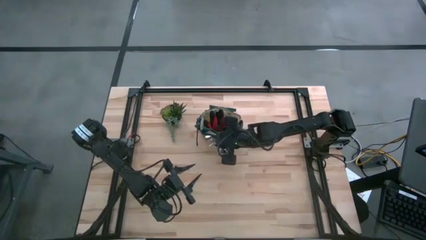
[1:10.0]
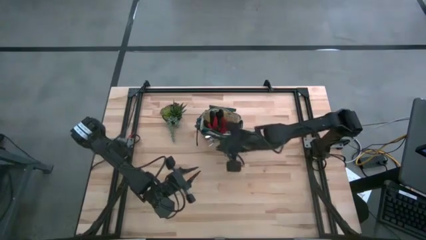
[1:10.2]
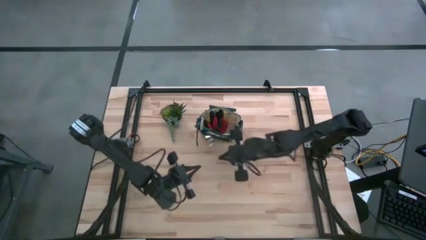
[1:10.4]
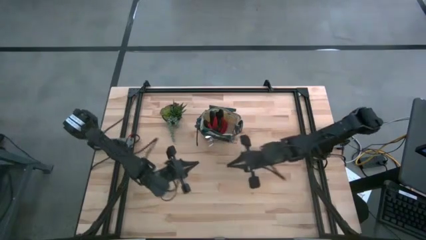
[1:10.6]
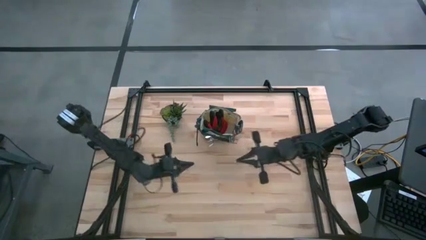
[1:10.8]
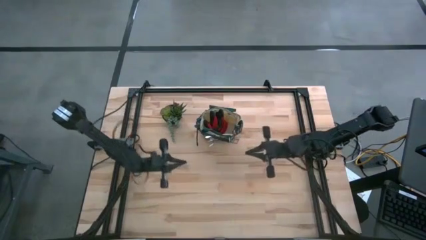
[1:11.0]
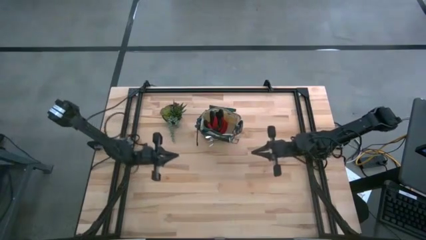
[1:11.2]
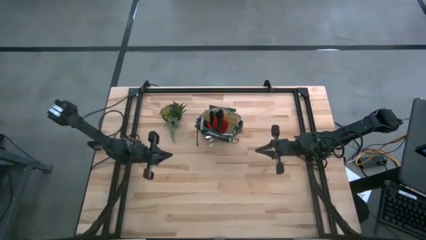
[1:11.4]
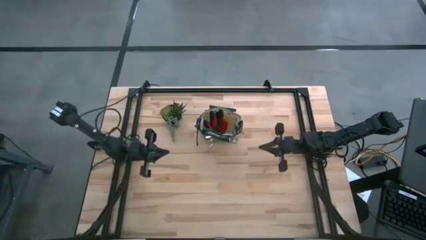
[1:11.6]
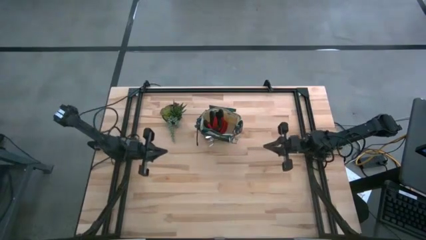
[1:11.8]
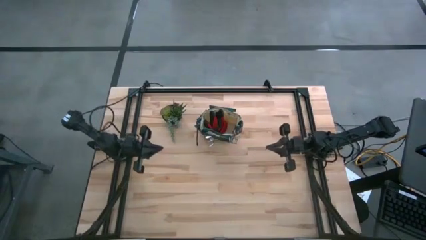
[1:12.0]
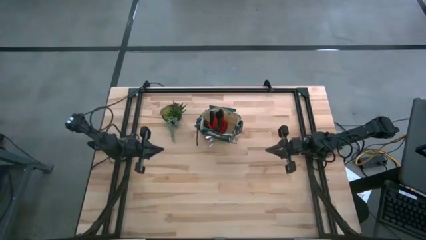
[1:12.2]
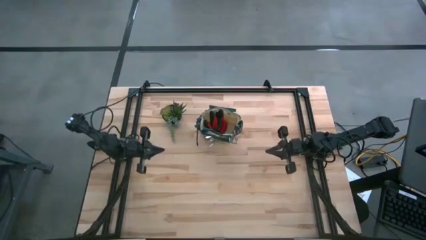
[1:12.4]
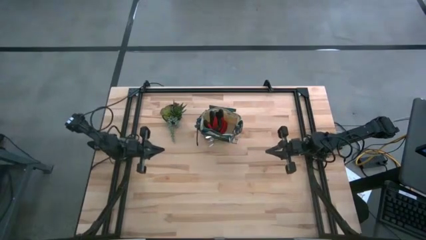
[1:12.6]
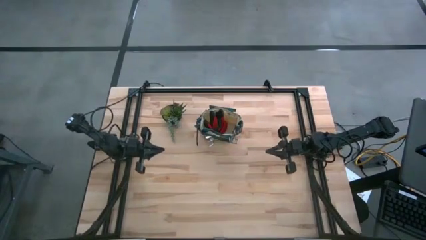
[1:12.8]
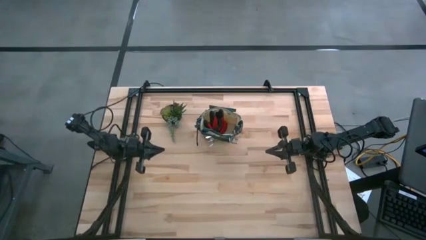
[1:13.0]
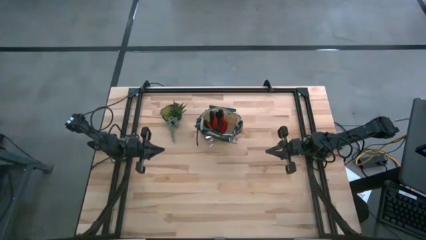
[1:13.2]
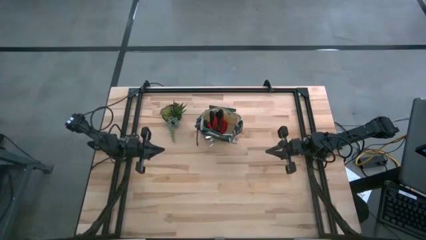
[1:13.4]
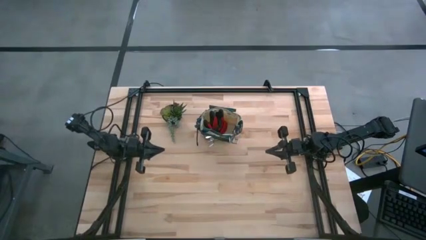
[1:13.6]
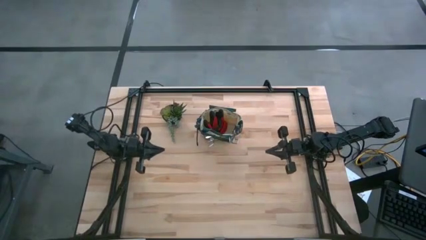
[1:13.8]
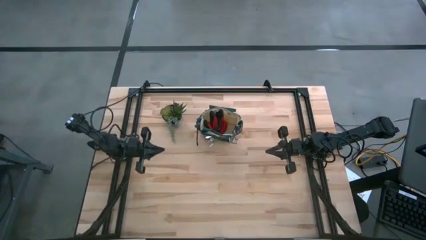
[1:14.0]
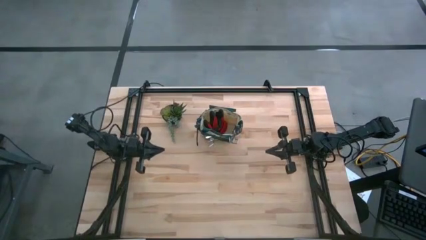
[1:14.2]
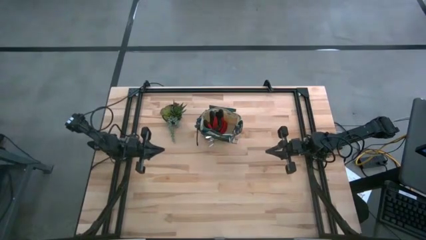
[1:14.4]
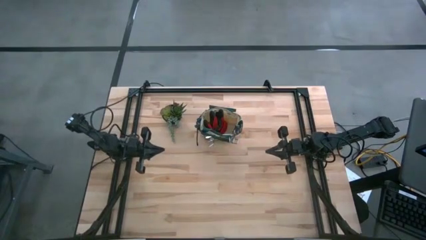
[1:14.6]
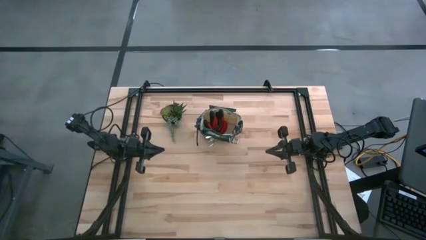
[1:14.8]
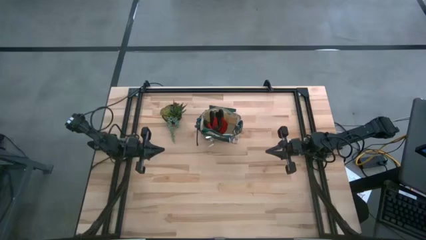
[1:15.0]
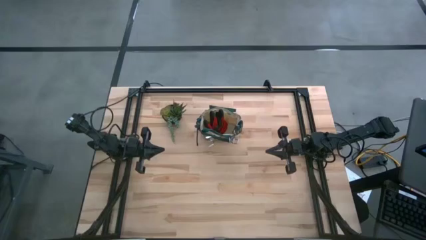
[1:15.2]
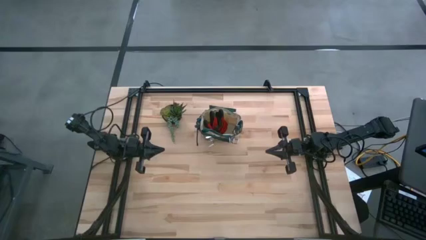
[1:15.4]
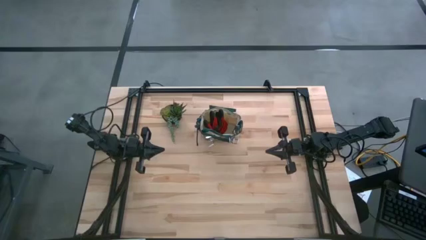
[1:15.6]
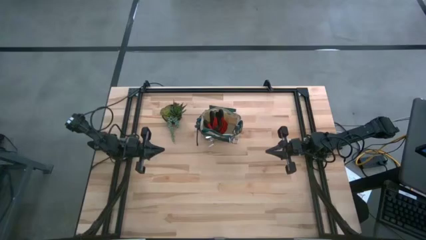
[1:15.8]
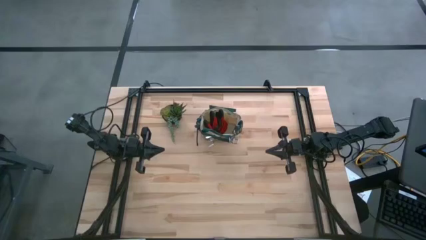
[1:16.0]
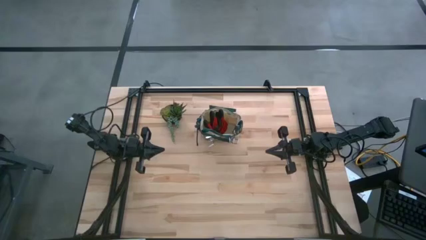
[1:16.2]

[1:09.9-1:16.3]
Task: Pick & Place Garden tools in Gardening bag
Return to Home Position

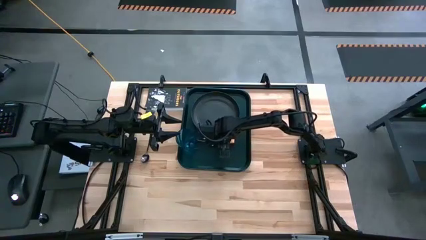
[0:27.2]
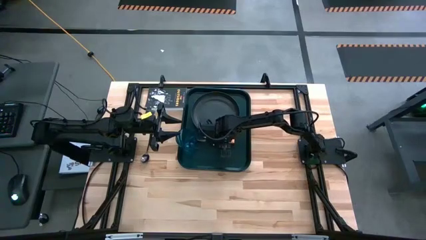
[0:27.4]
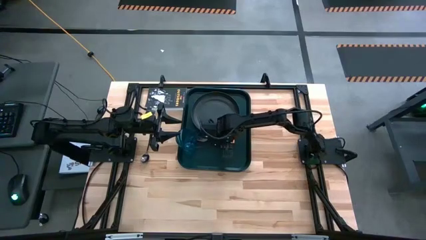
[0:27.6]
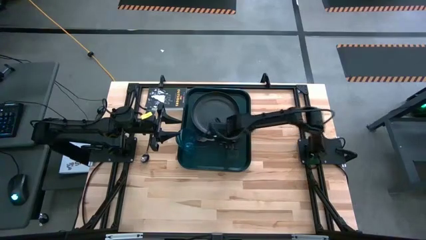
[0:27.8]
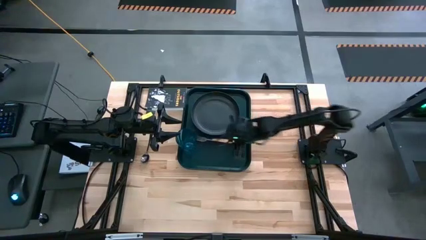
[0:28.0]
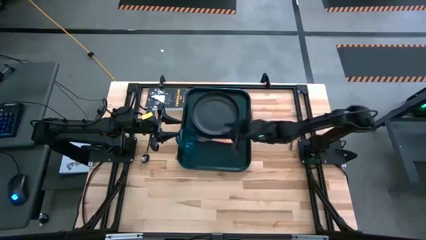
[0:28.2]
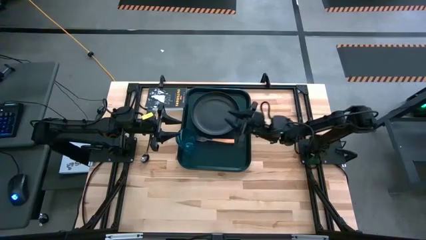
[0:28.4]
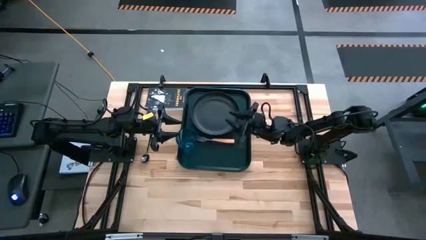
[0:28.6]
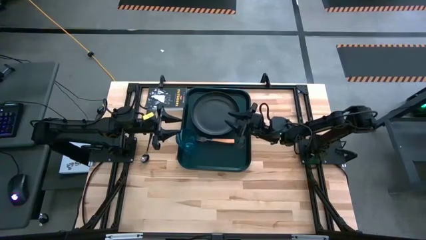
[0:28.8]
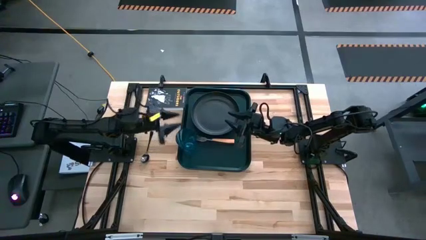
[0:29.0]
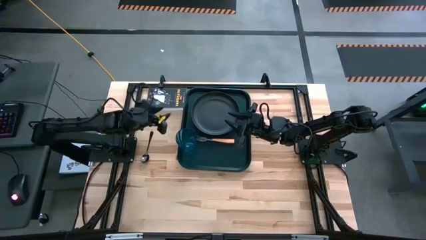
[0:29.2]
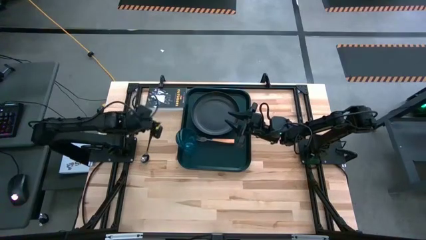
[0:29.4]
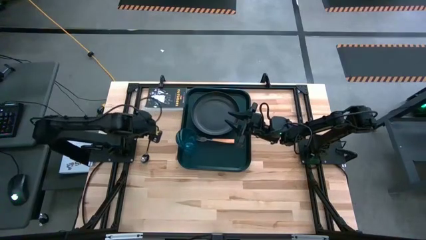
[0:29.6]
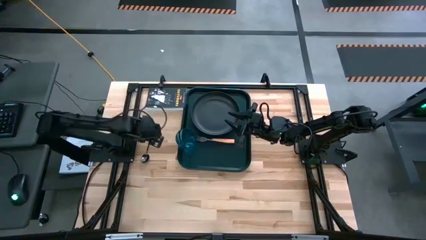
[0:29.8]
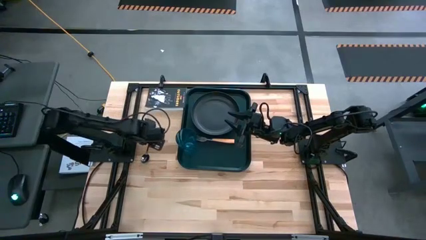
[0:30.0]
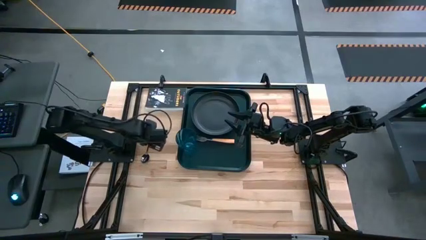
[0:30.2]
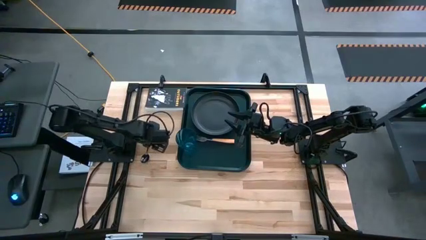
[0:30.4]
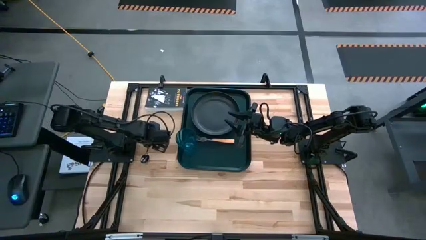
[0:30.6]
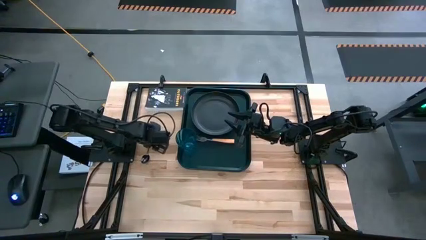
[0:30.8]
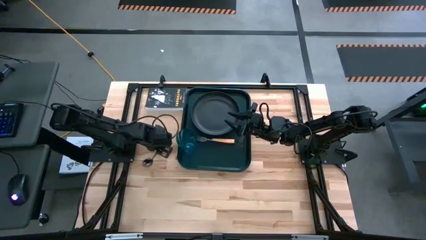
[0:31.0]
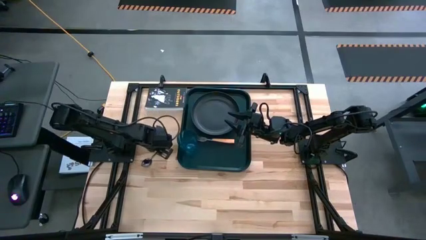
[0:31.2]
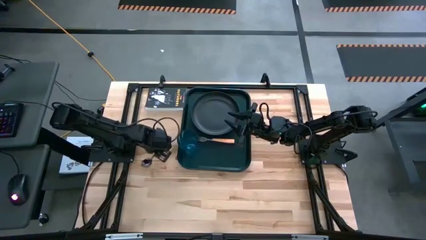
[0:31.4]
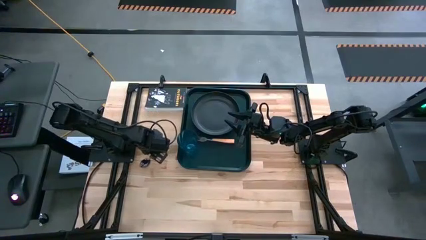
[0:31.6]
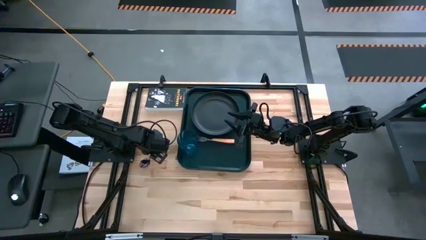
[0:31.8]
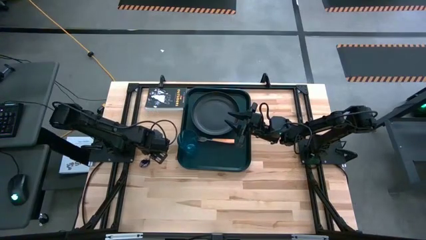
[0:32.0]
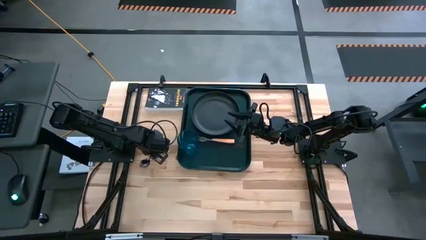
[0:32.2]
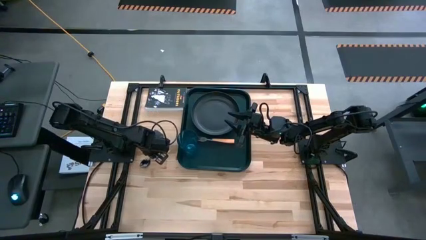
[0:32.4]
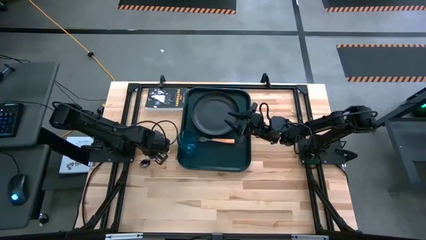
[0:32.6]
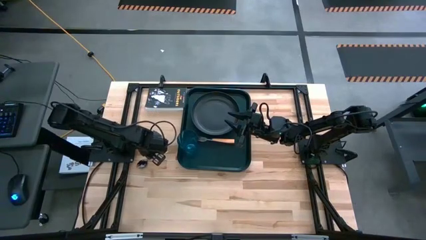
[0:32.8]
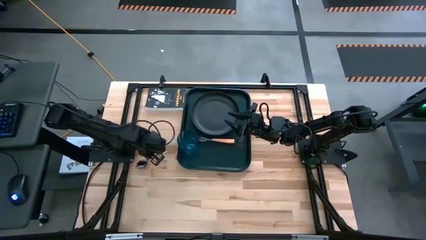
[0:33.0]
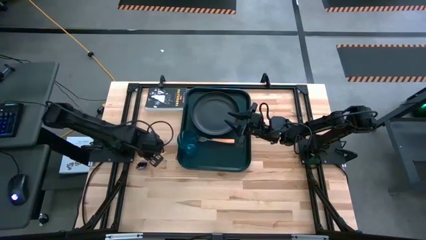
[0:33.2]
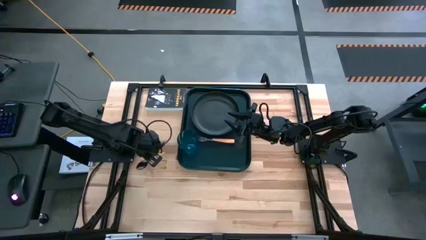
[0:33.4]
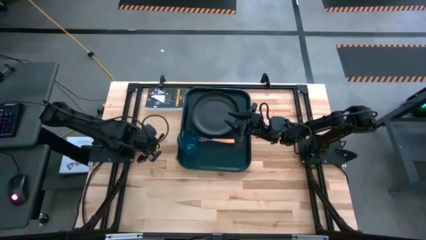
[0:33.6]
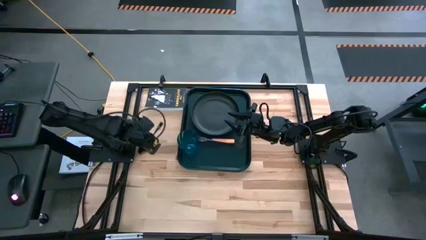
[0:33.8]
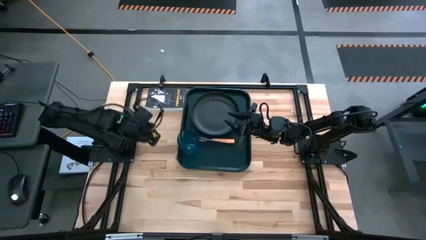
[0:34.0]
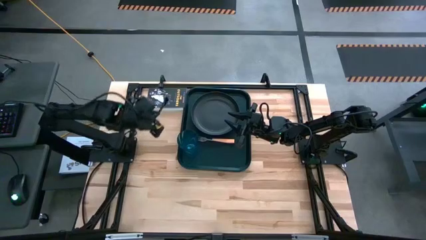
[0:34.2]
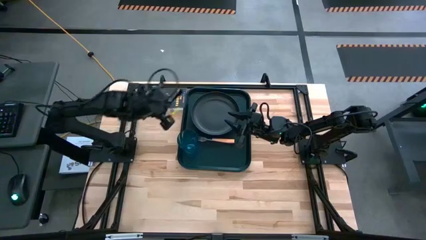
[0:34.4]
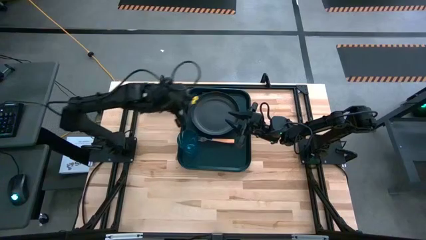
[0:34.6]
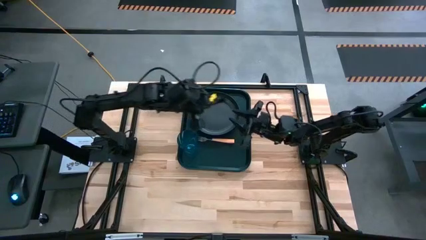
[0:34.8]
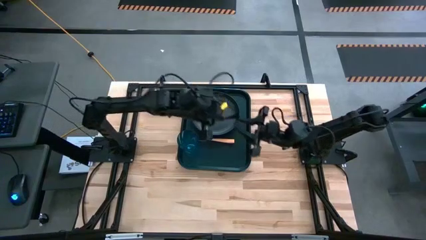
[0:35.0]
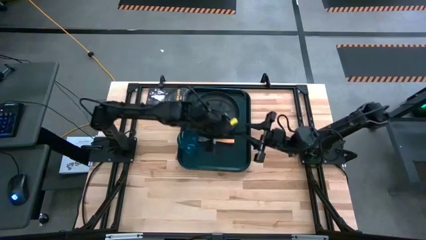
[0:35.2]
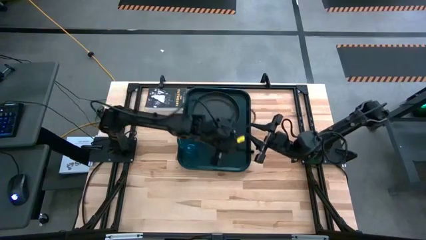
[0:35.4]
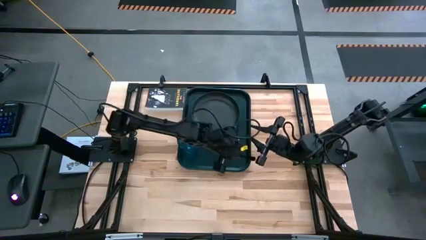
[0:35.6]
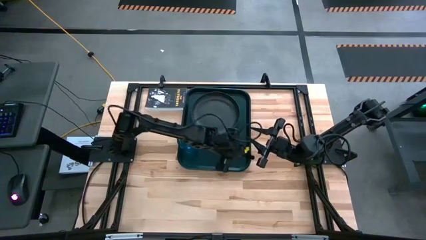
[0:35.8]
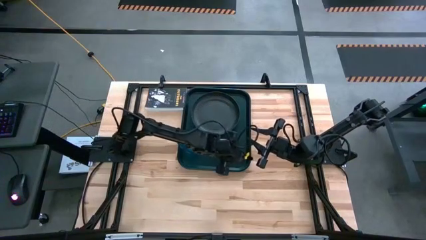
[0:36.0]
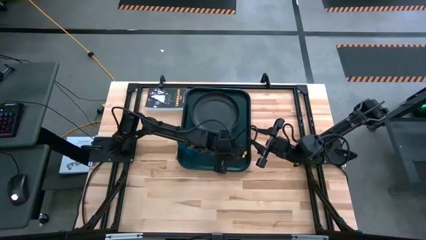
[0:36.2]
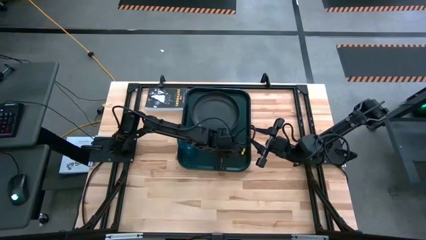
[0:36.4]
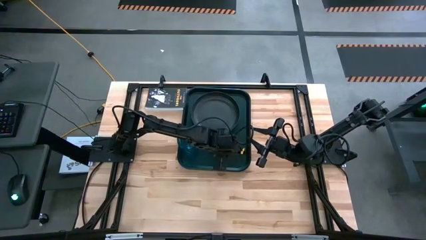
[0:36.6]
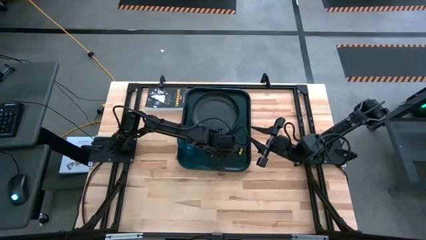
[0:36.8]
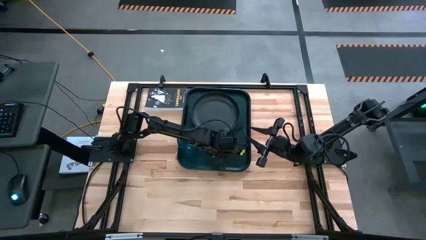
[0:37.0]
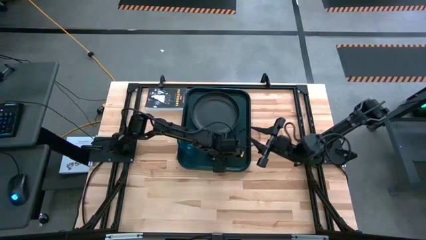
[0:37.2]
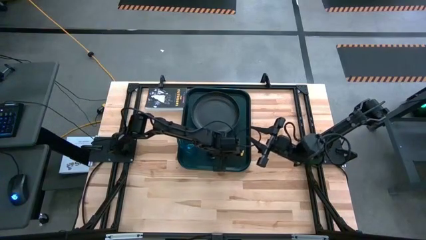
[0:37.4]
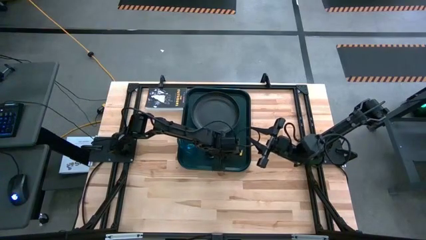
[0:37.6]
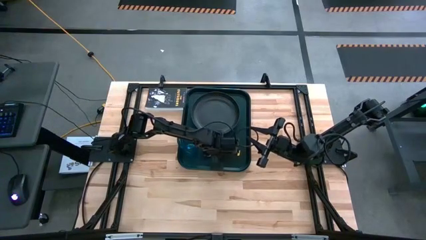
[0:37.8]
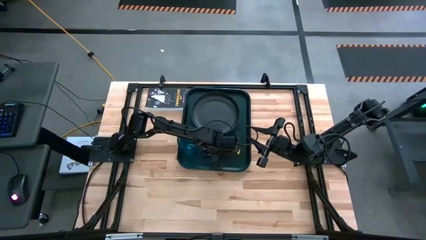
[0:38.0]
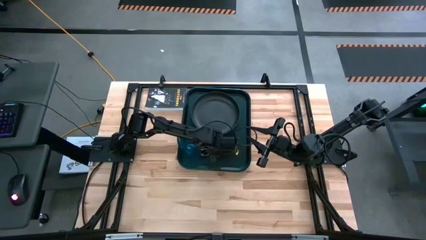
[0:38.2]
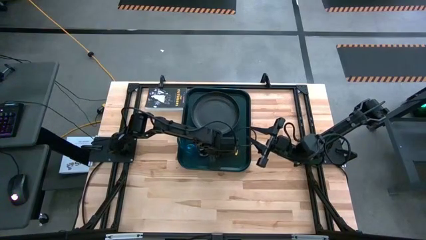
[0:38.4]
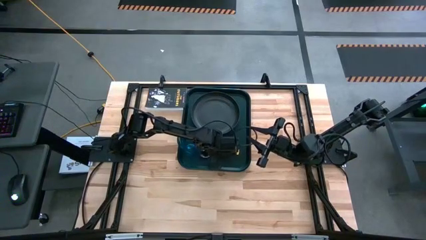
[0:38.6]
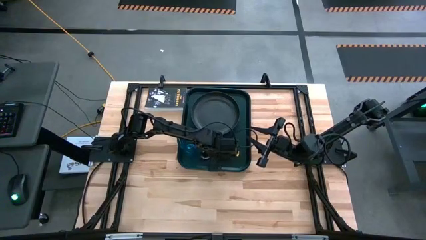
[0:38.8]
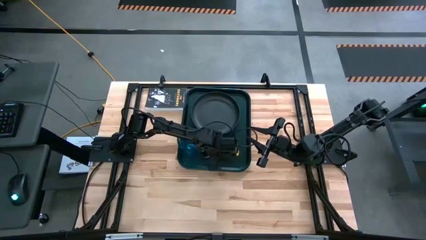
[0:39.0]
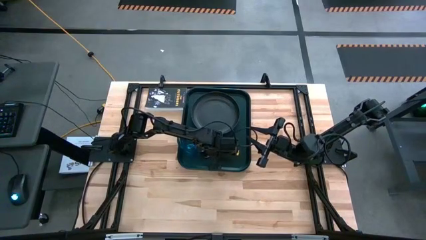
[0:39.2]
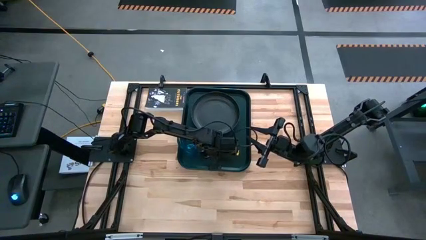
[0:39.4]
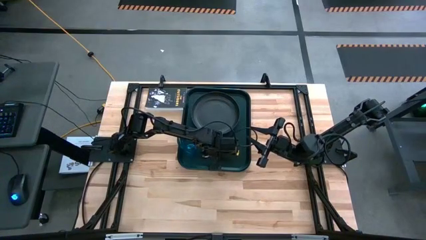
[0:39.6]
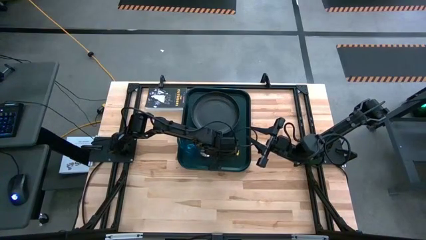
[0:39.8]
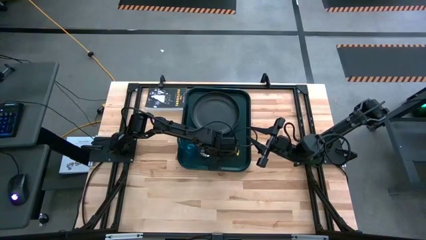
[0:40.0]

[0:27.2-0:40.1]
Task: Pick and place plate/cup/fork/spoon on tray
Put the black spoon on the left side of the orange fork on the black serving tray
